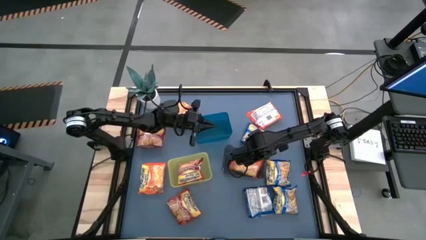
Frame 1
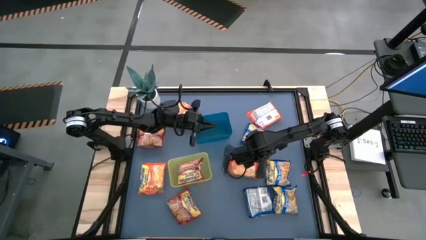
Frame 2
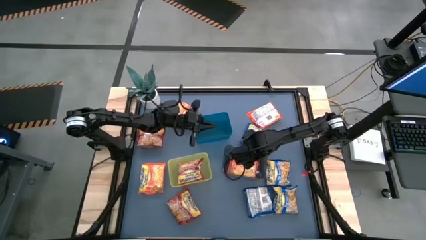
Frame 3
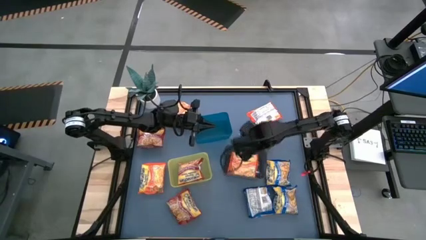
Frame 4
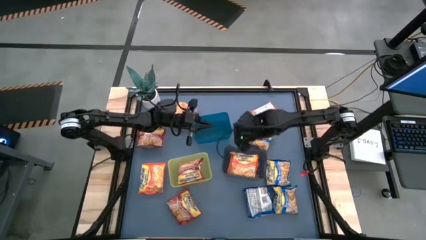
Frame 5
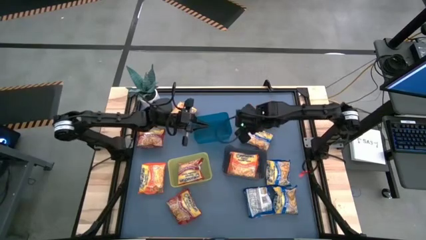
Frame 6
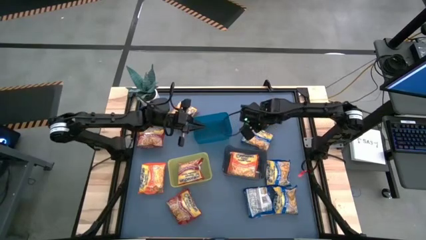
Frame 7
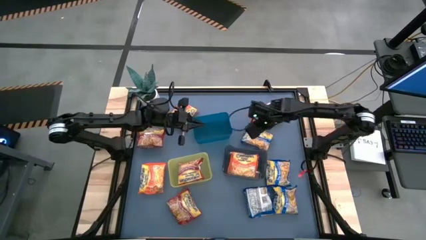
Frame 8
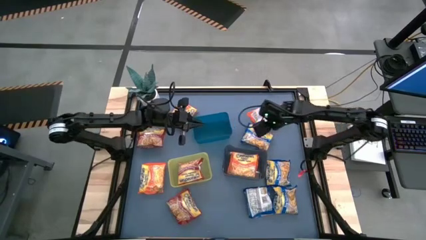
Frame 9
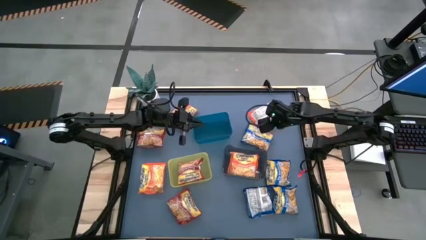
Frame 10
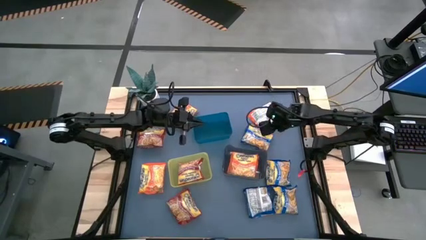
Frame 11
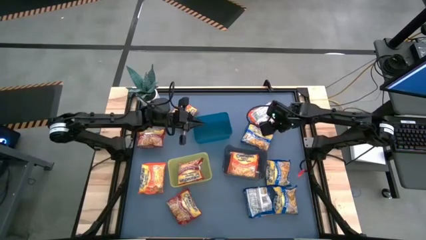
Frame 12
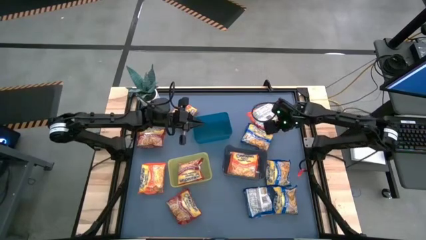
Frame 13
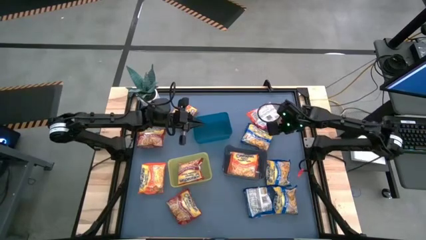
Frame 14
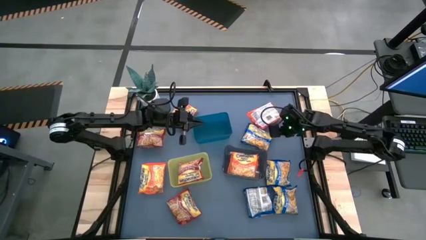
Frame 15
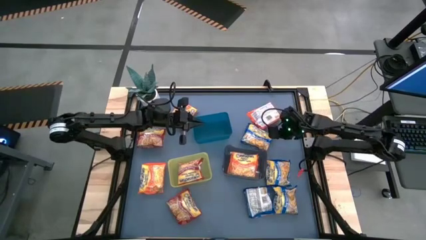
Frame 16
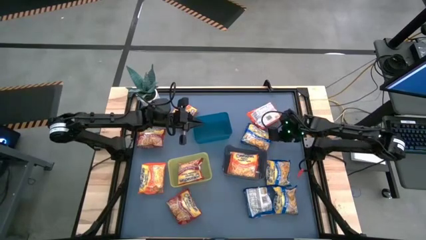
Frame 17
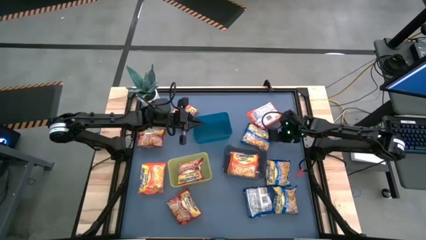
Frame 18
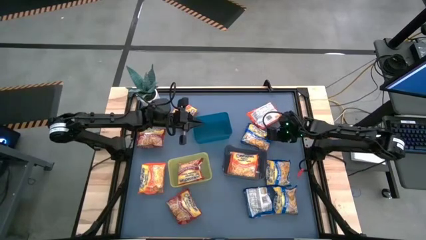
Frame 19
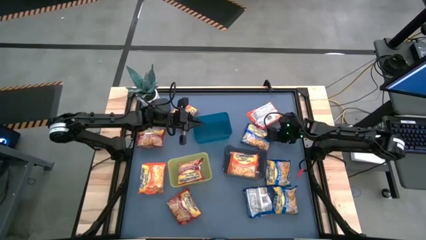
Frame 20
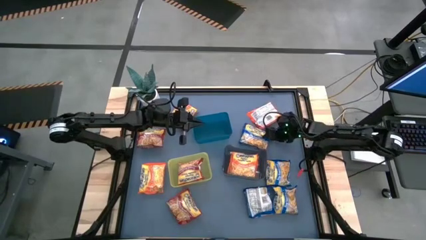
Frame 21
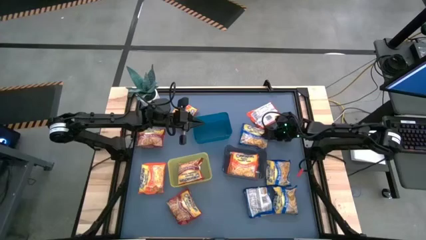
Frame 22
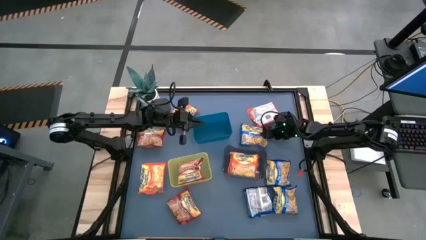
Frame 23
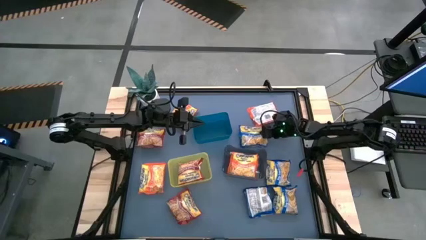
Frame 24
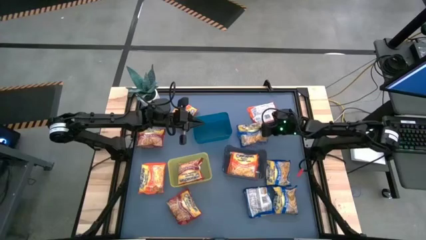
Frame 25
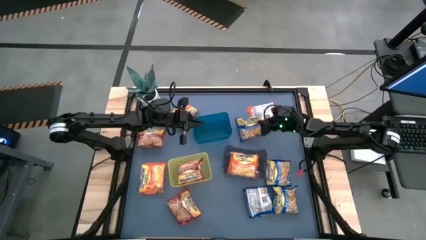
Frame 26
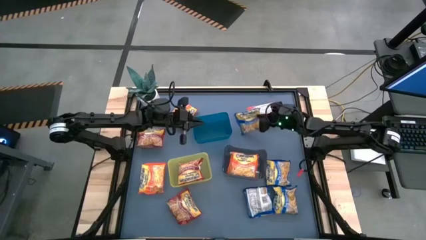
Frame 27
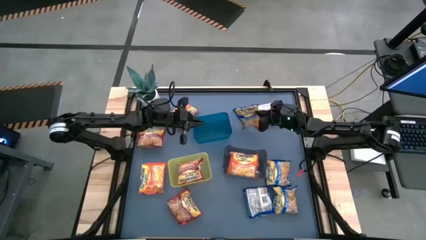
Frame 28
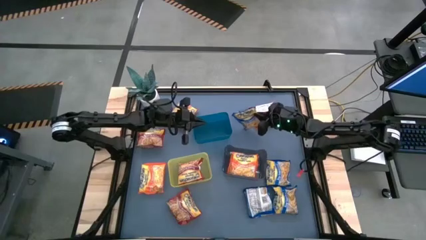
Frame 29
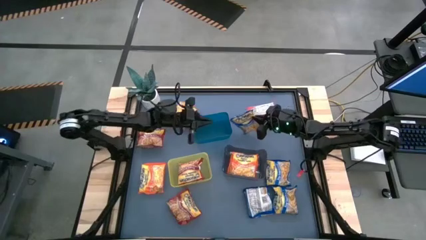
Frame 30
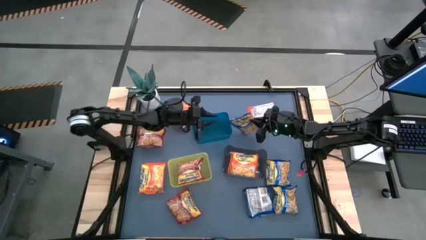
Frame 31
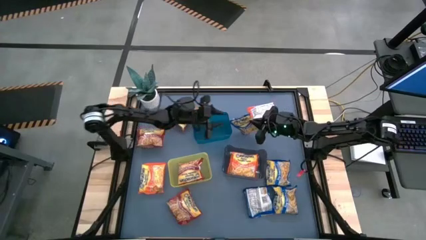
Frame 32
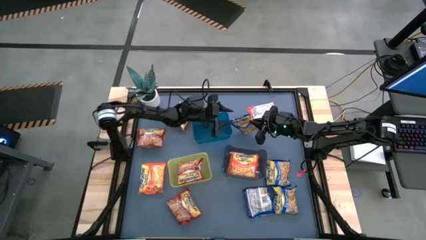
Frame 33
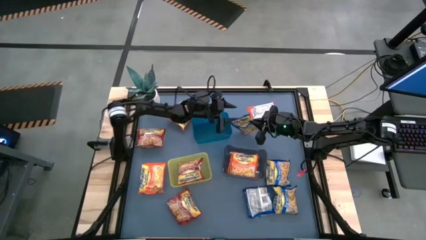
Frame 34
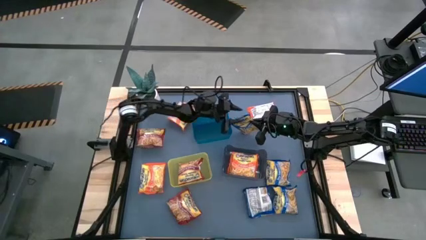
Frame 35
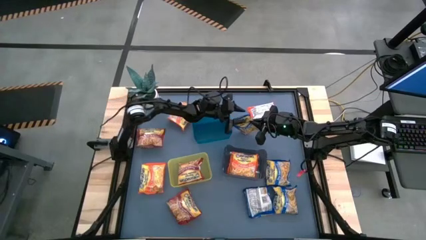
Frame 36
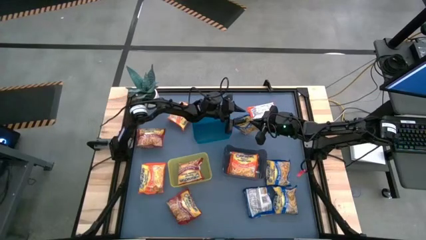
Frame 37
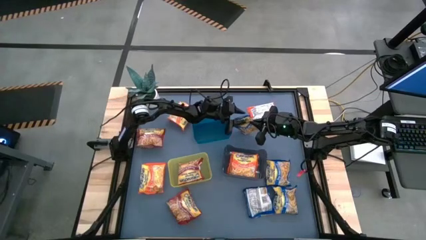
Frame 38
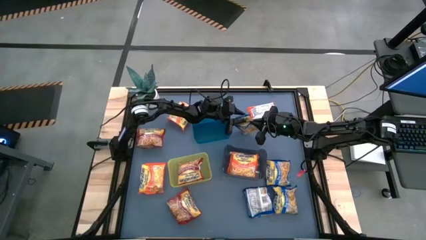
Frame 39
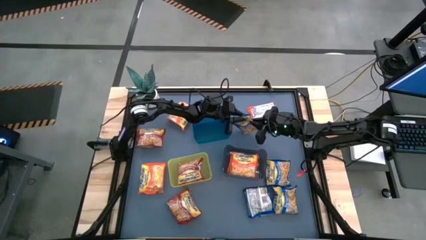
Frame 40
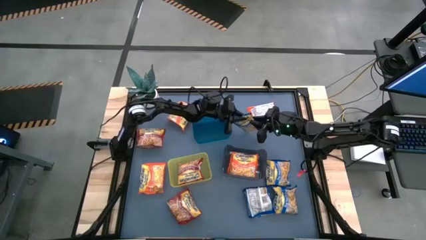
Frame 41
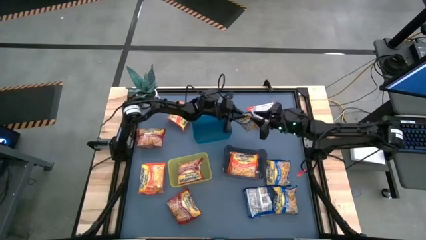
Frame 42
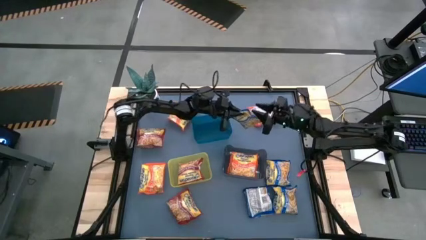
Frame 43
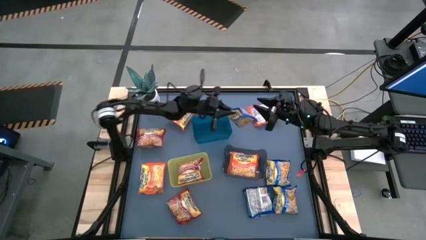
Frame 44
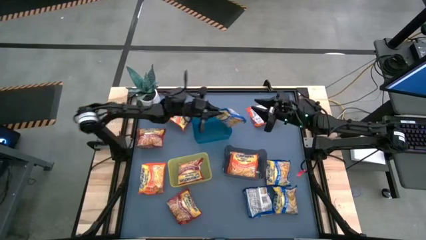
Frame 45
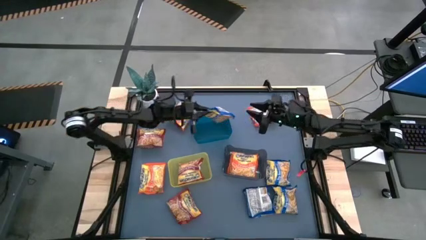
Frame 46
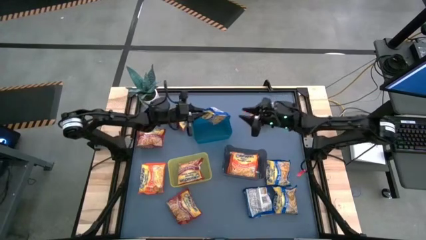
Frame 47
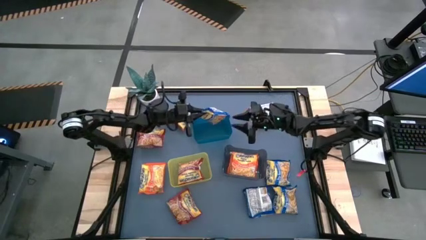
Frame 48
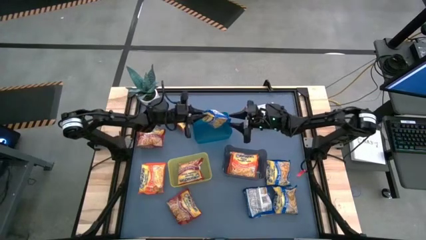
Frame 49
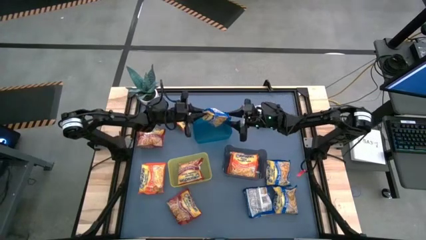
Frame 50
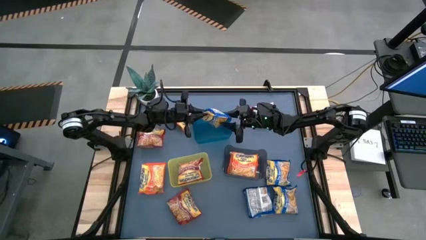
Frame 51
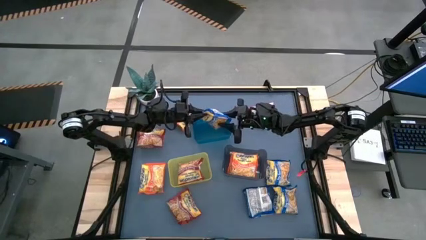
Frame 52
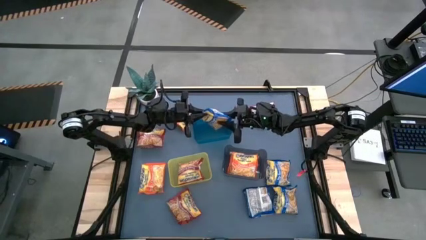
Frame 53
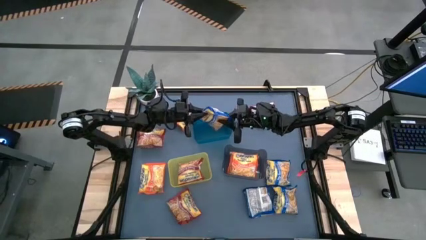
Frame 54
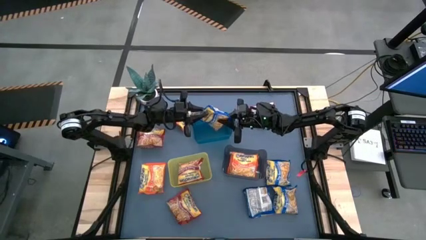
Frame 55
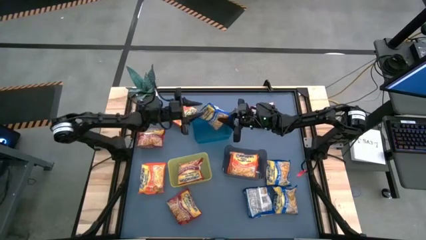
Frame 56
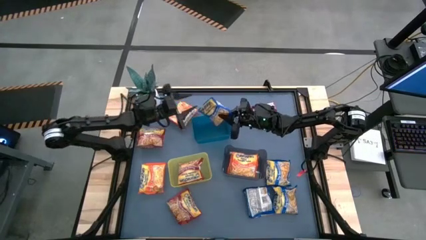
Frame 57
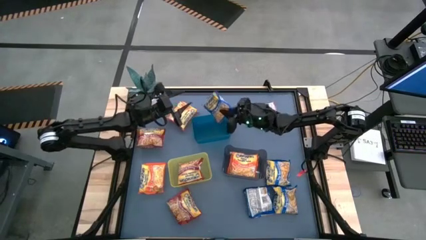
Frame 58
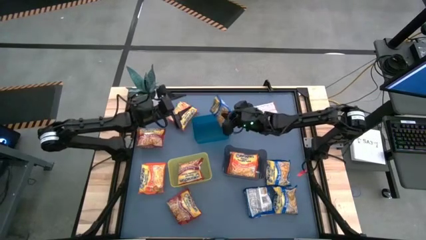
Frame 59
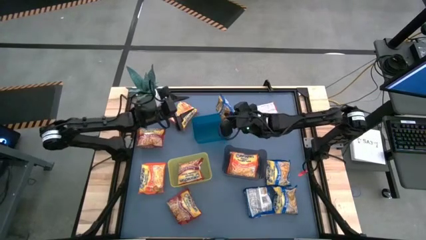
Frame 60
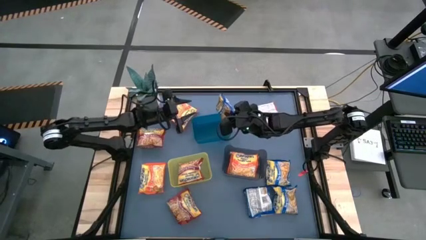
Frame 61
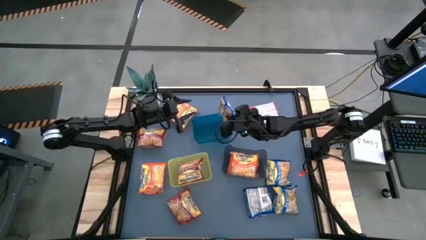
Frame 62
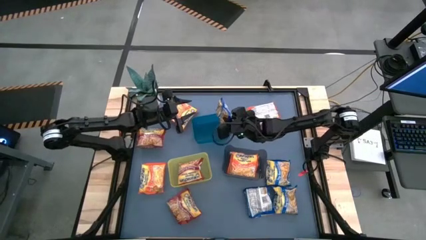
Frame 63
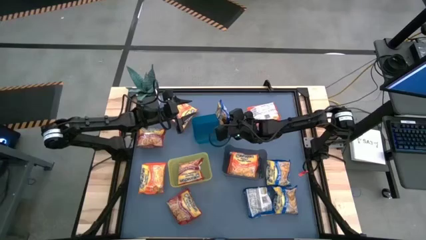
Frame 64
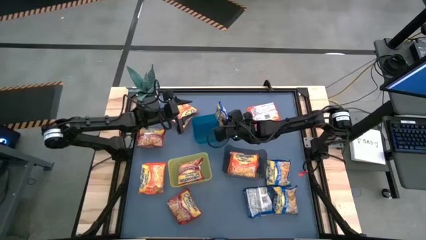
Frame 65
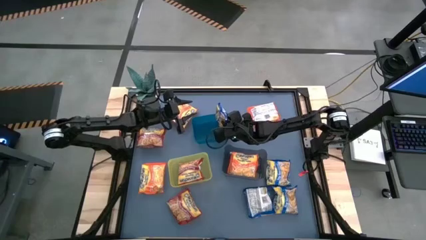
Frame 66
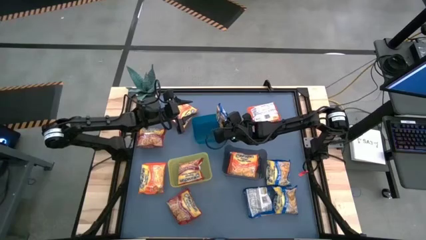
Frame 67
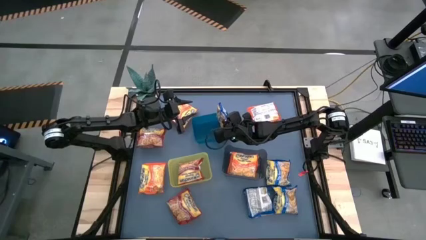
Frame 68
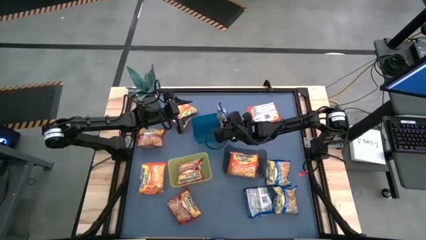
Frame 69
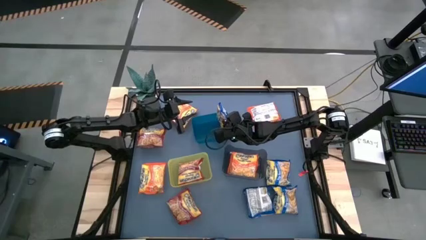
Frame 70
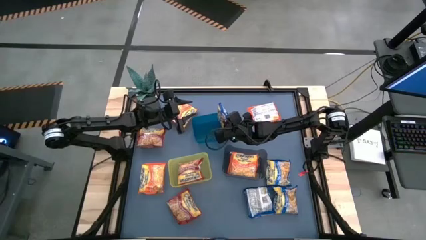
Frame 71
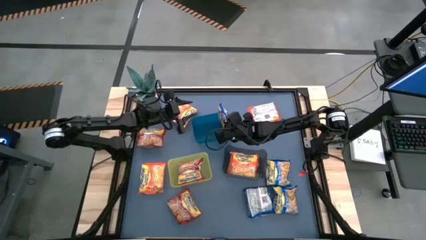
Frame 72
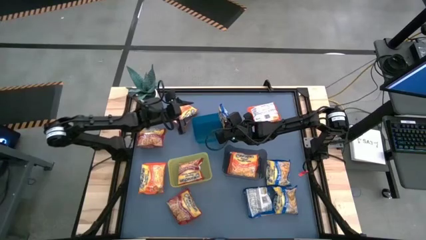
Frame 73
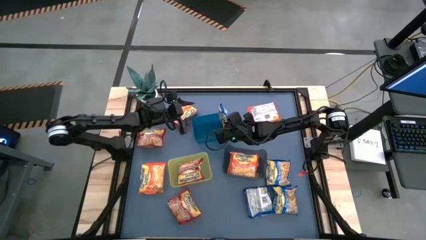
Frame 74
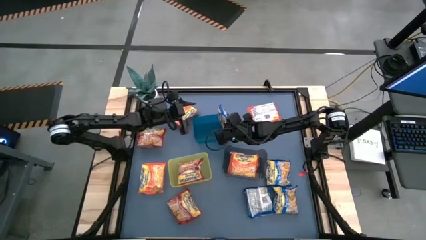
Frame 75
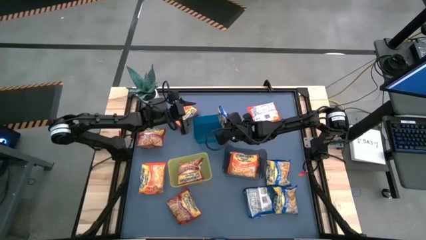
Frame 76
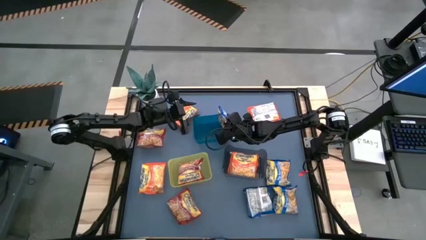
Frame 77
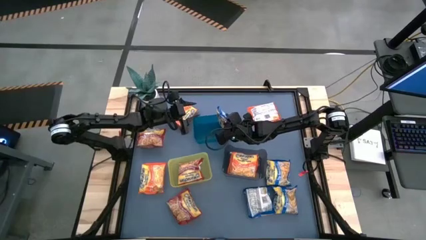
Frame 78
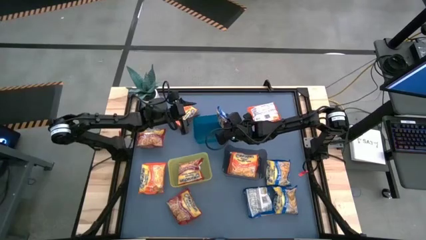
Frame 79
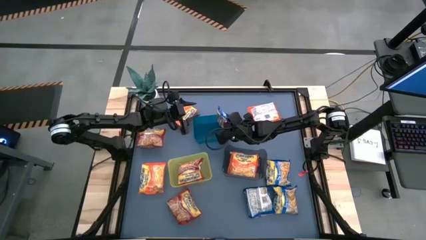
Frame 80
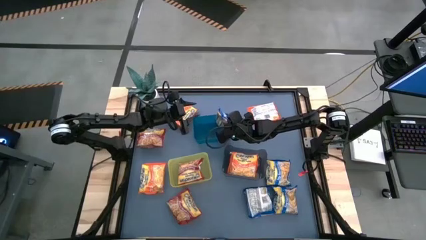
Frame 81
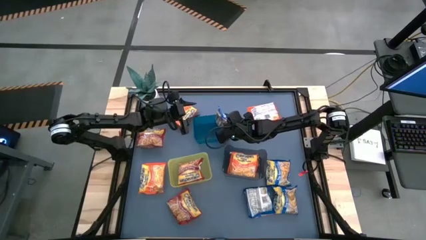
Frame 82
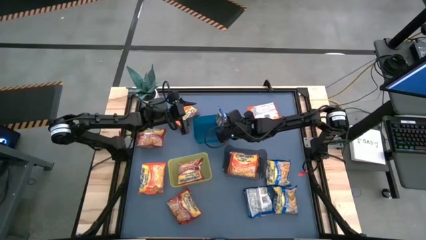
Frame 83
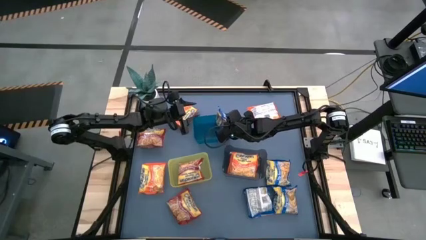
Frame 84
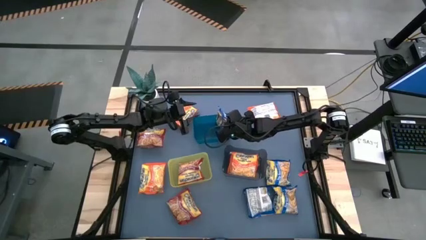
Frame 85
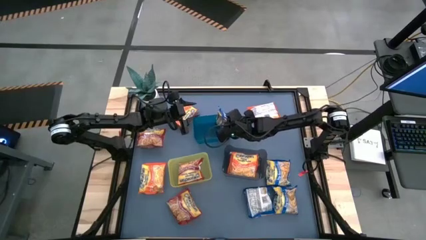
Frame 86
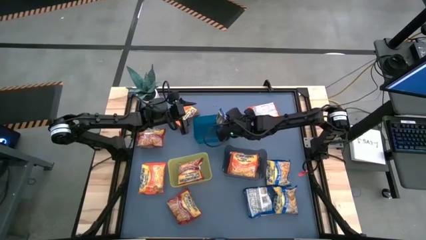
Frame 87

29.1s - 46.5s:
Task: Sort Maruchan noodles
Put the blue noodle pack into the blue bin
